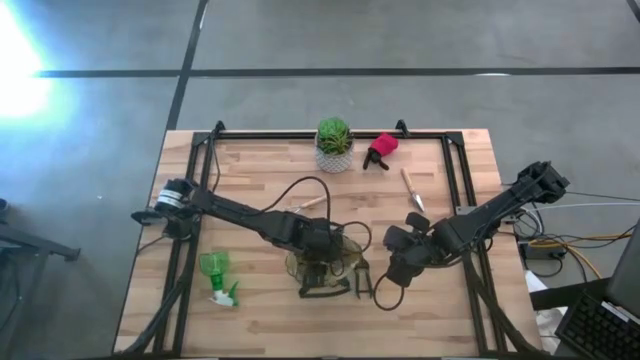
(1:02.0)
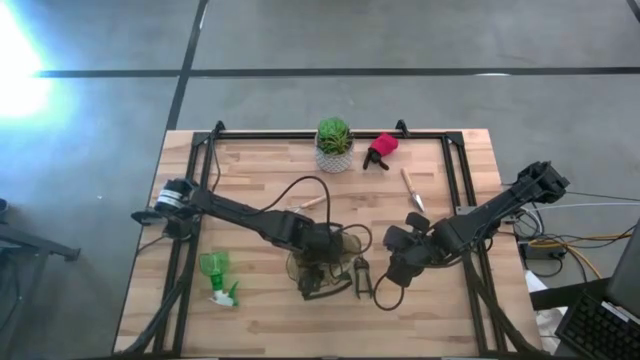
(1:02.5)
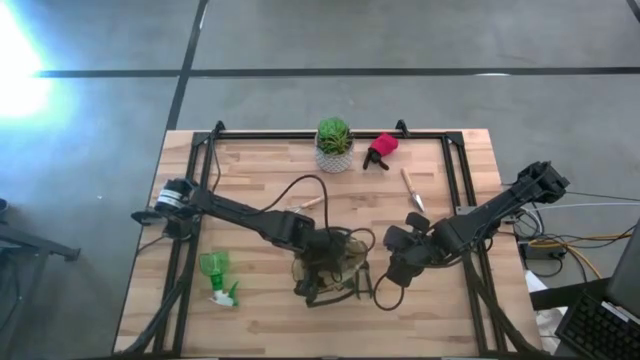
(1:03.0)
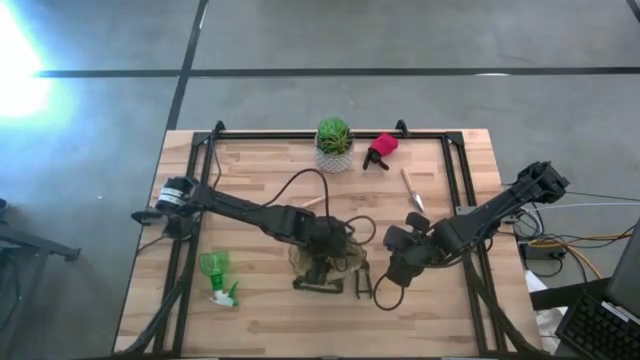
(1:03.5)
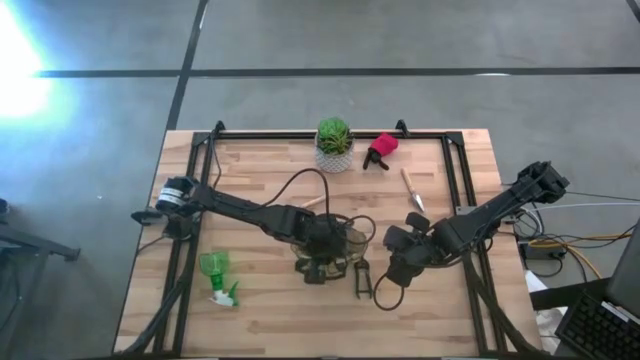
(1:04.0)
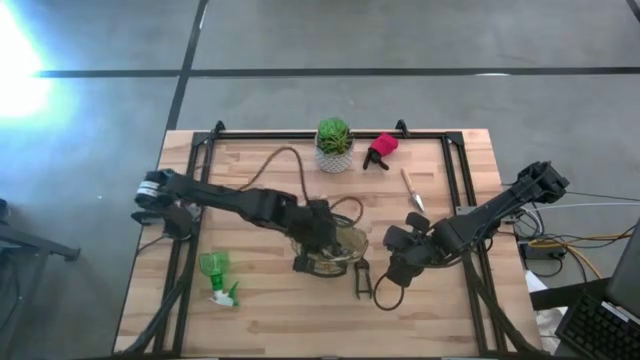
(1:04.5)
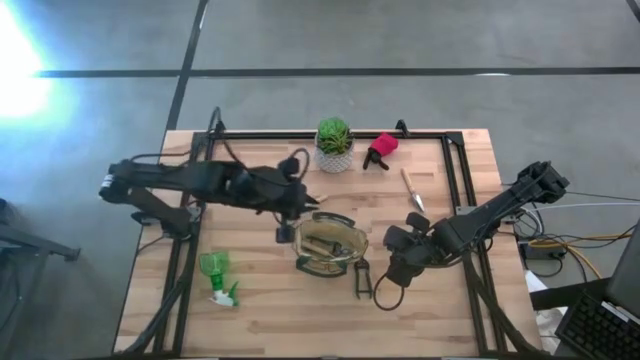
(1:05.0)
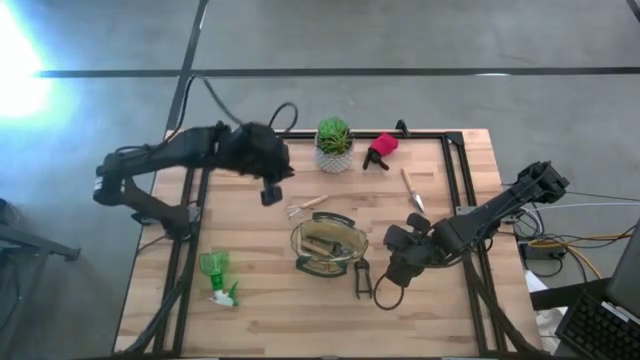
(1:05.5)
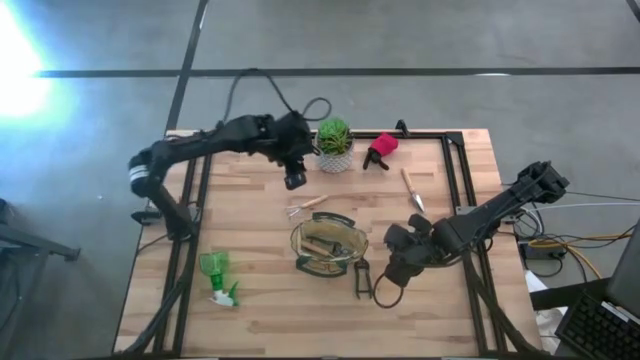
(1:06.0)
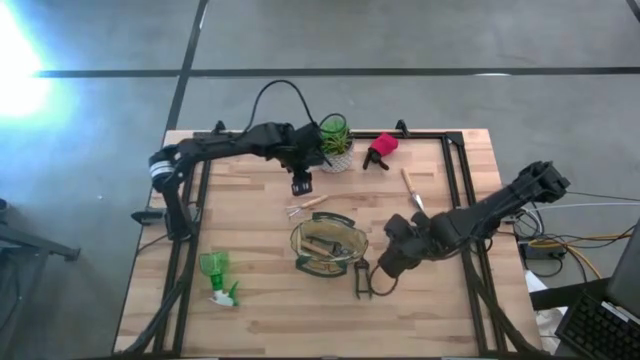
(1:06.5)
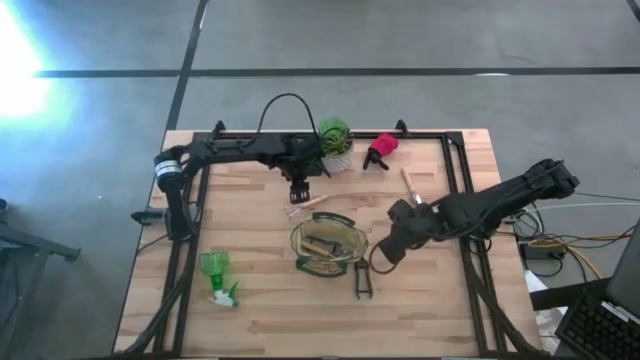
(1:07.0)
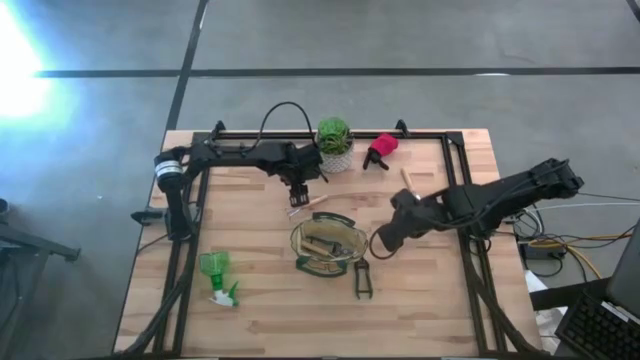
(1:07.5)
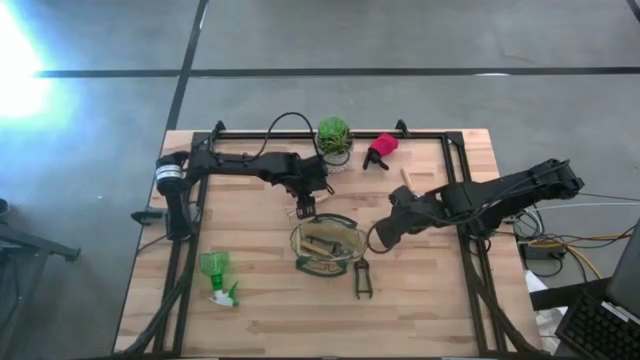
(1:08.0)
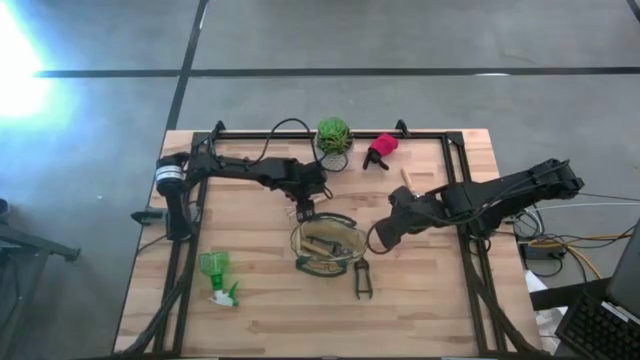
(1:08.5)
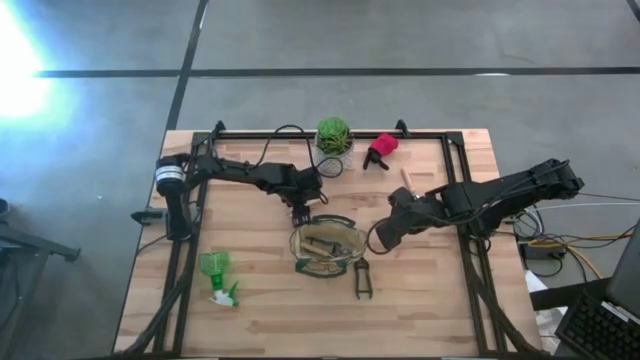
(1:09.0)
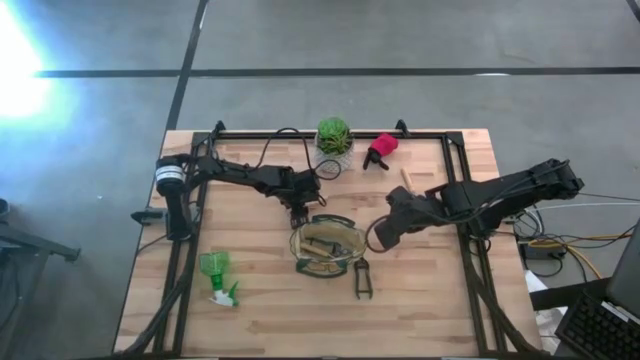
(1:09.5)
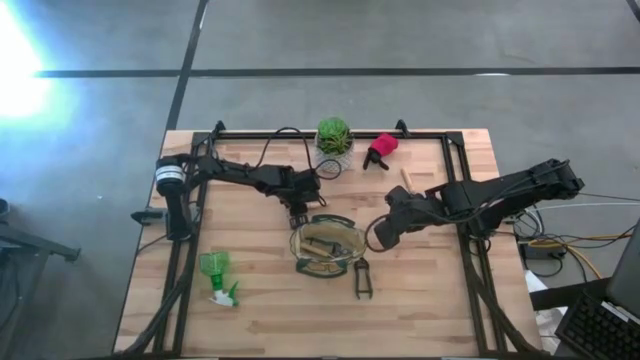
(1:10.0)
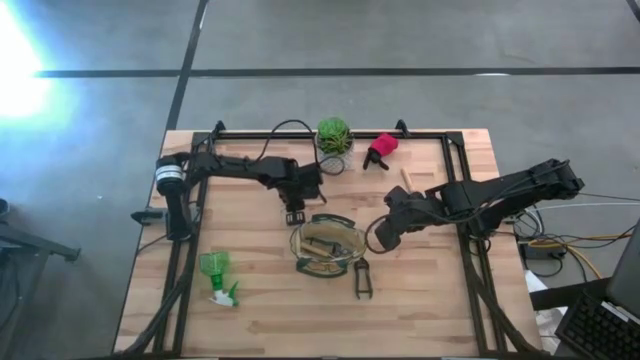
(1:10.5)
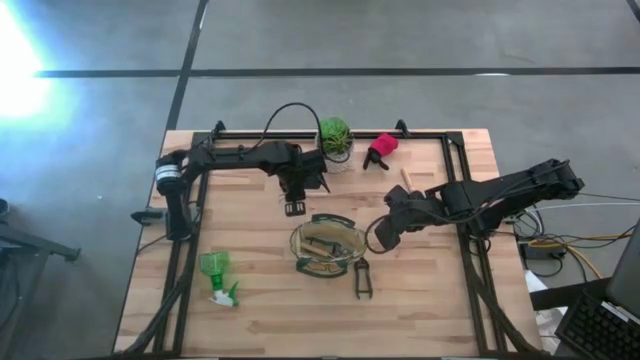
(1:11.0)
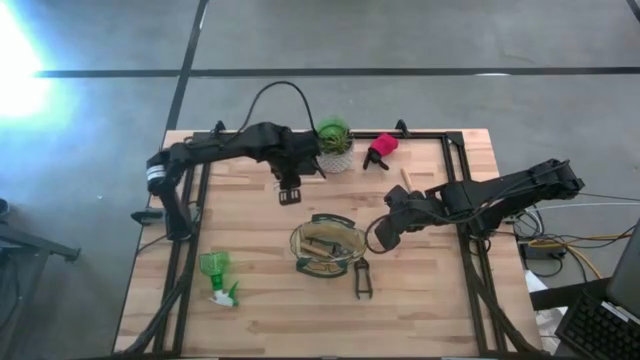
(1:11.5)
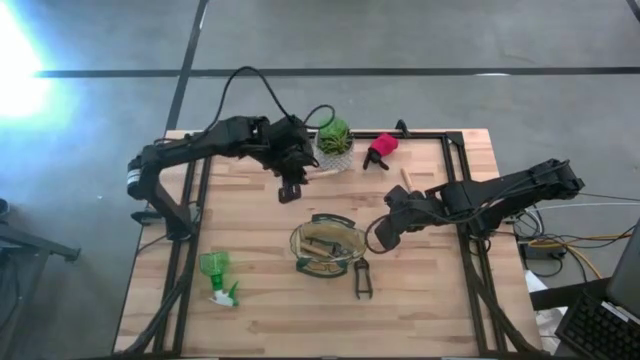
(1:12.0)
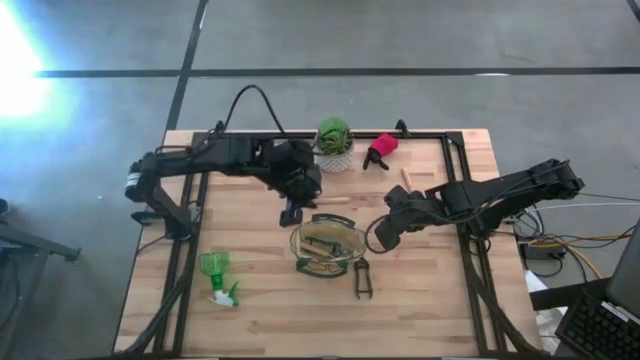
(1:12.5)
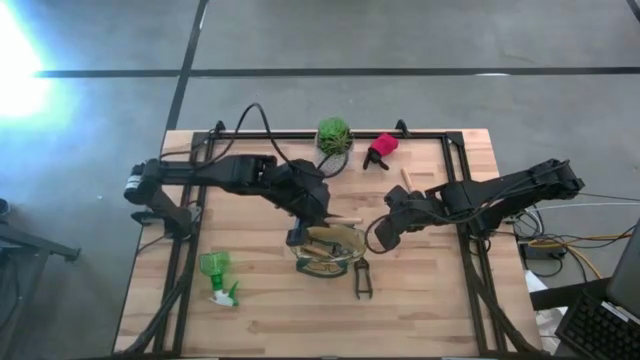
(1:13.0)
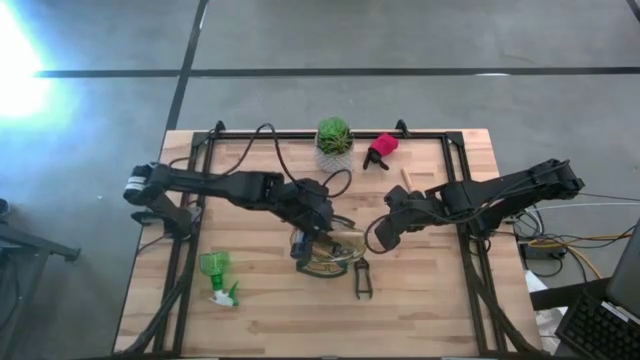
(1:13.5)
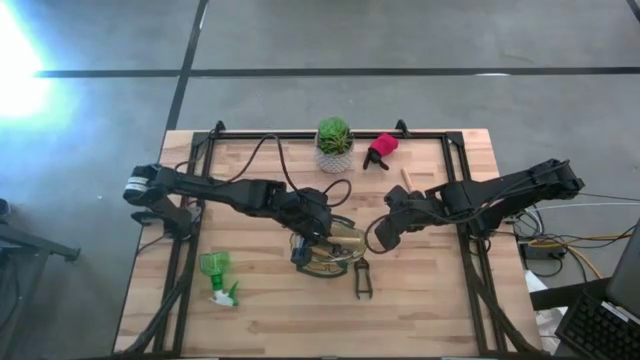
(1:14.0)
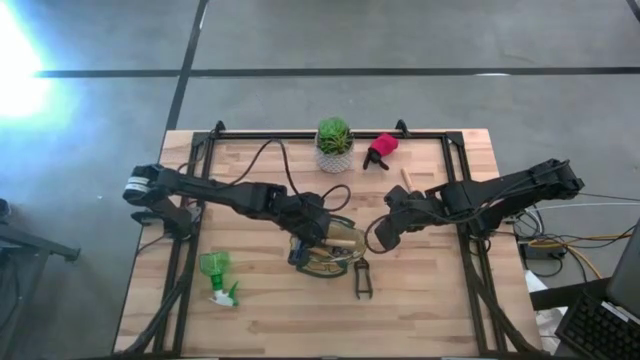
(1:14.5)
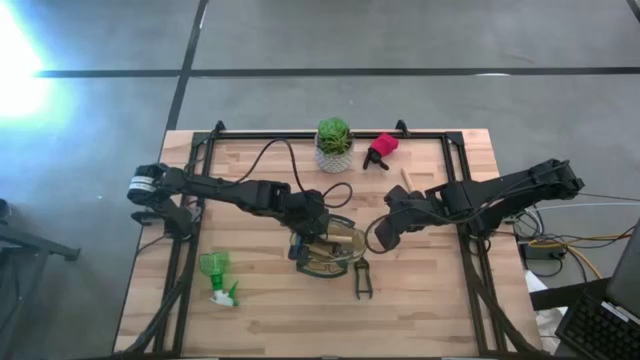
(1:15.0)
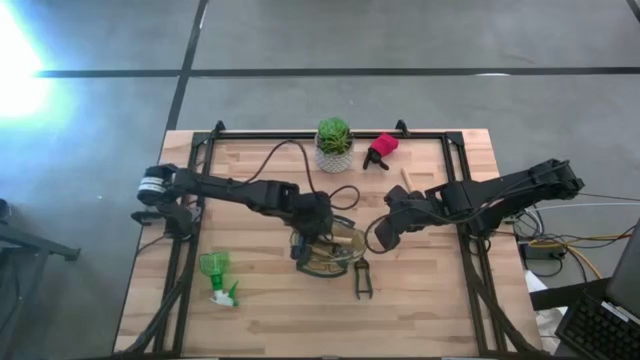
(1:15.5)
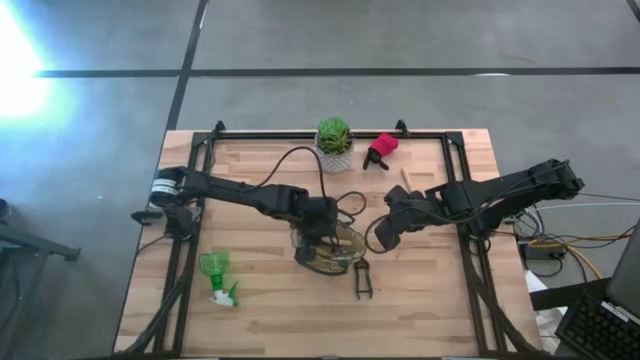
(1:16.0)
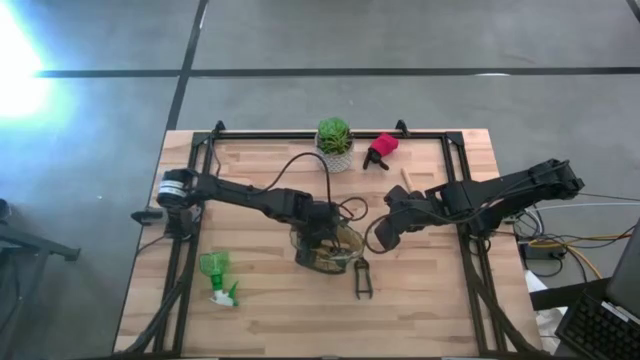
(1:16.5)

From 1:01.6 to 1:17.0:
Task: Pick & Place Garden tools in Gardening bag
Put the brown hand rake into the white gardening bag

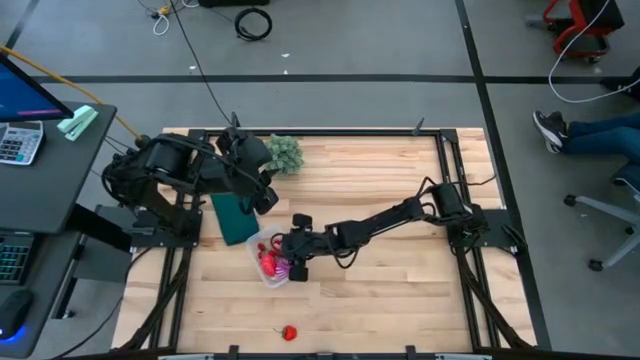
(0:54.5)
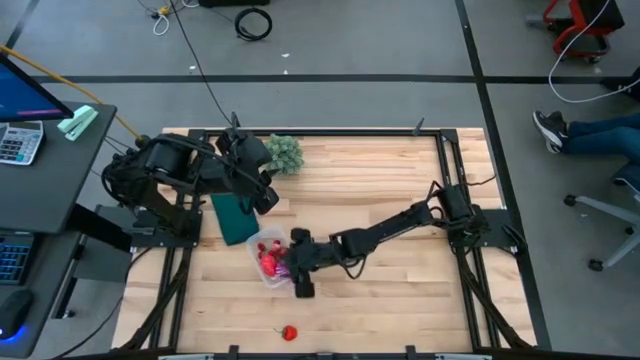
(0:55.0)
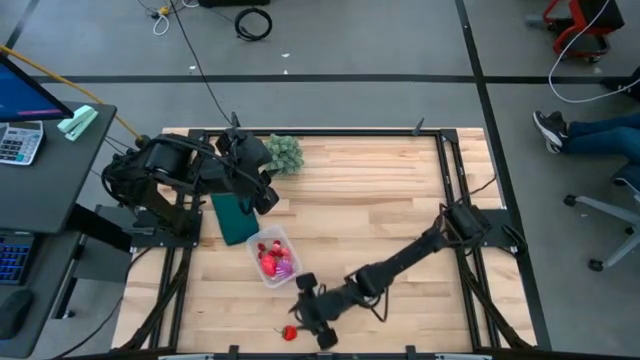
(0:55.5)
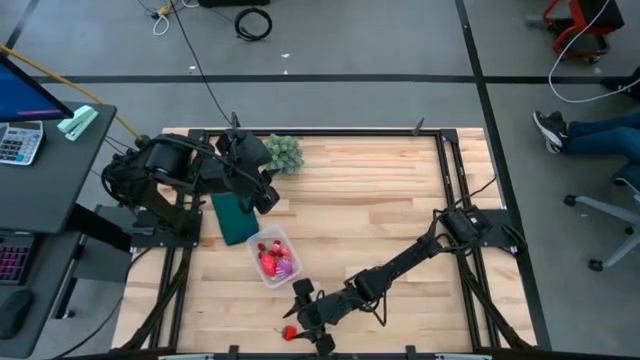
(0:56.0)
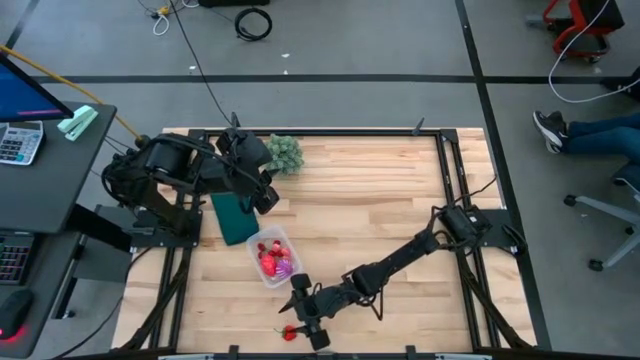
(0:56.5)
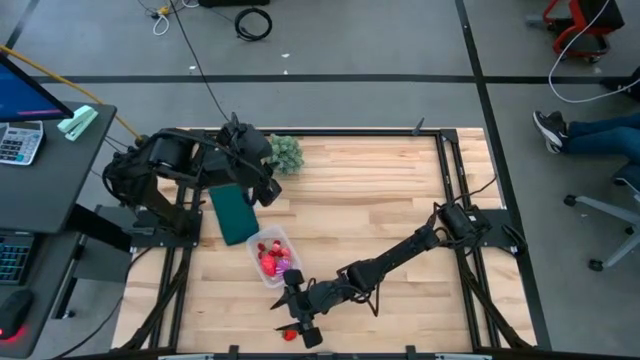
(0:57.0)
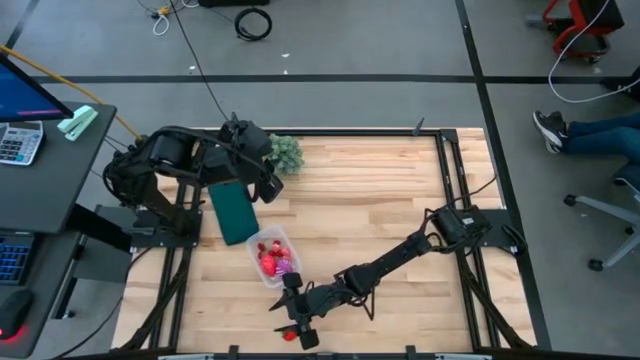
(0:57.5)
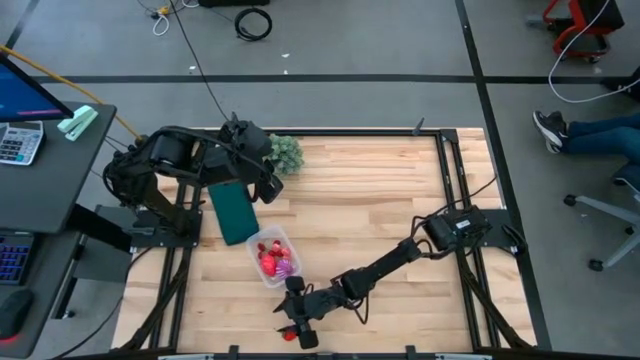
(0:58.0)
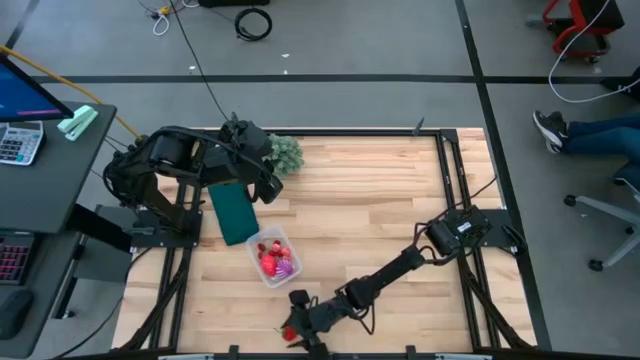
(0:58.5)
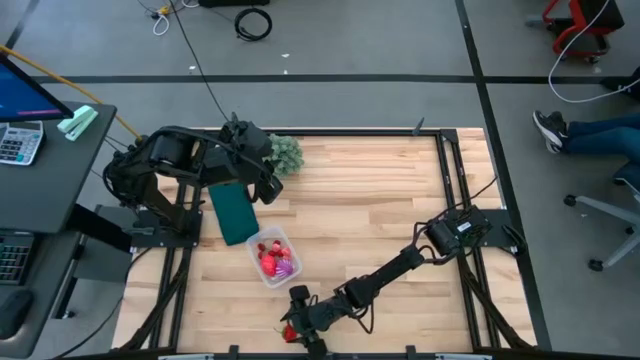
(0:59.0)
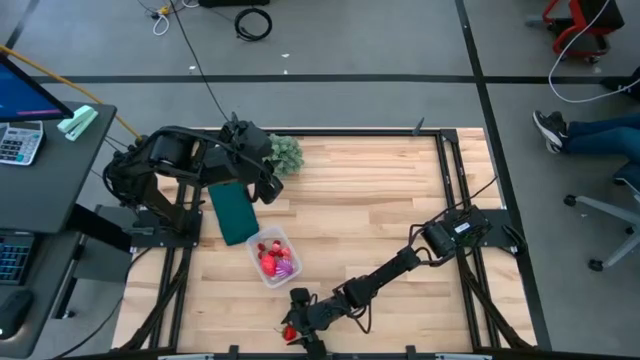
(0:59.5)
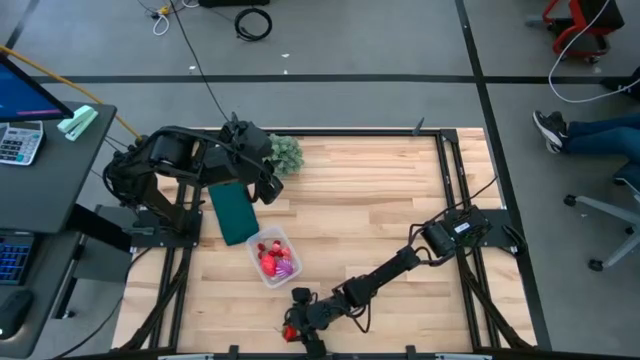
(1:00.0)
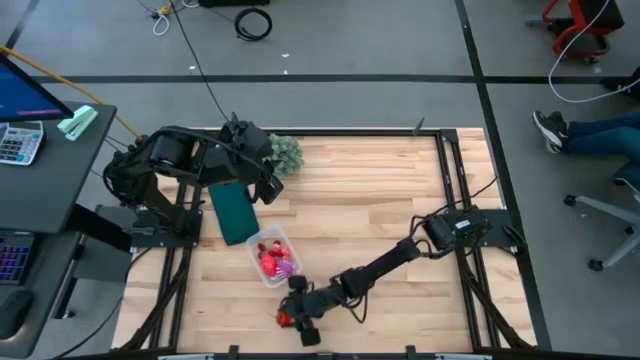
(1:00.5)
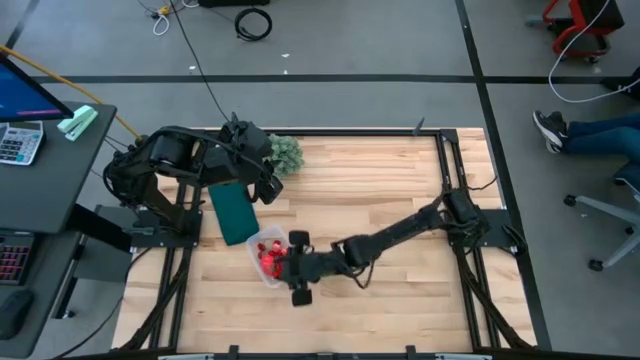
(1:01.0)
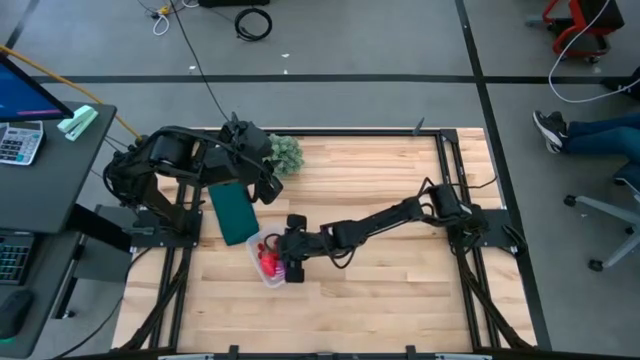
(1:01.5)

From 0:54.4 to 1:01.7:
Task: Pick and placing Produce into tupperware
Put the red strawberry into the transparent bin
